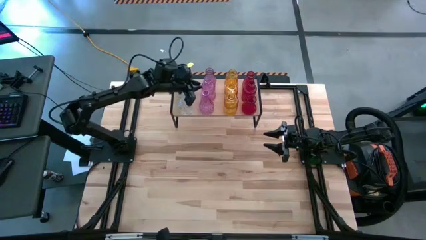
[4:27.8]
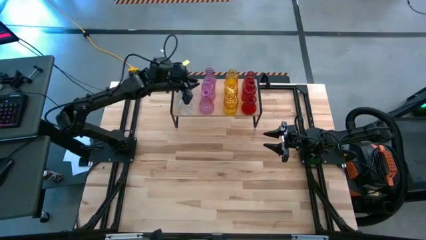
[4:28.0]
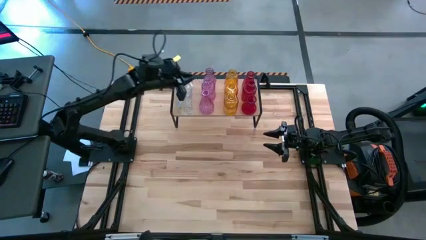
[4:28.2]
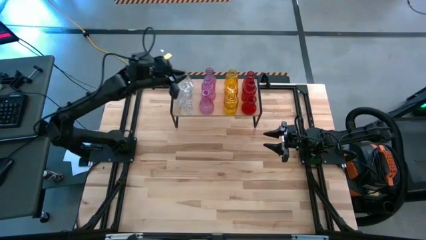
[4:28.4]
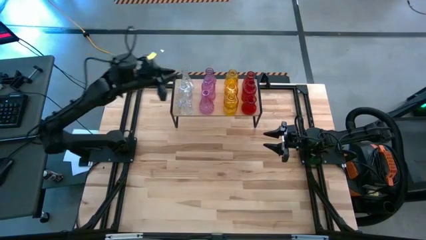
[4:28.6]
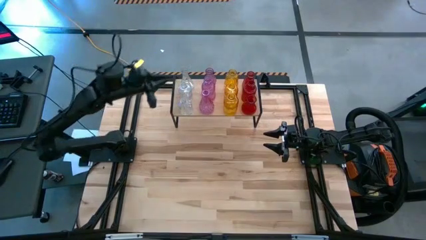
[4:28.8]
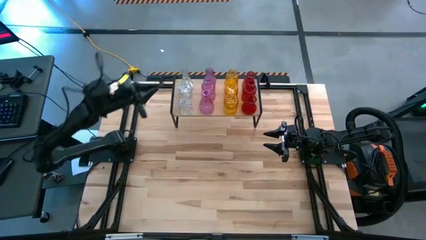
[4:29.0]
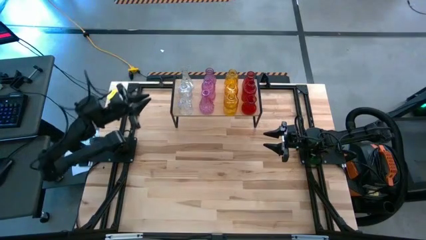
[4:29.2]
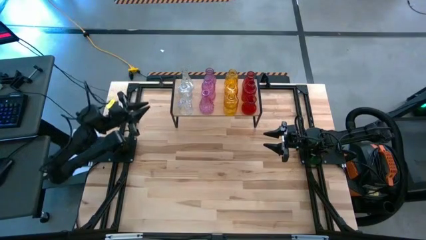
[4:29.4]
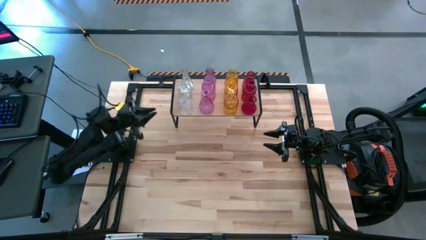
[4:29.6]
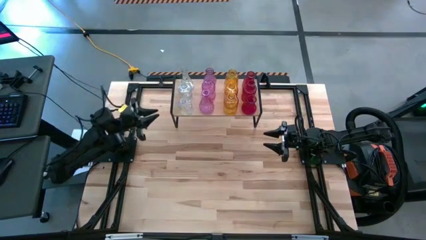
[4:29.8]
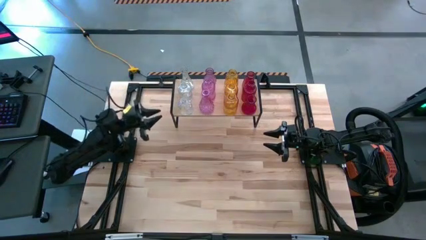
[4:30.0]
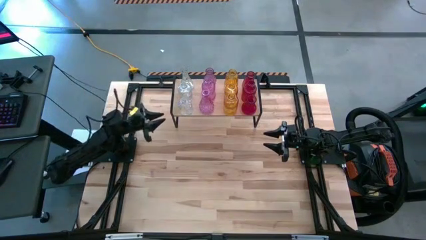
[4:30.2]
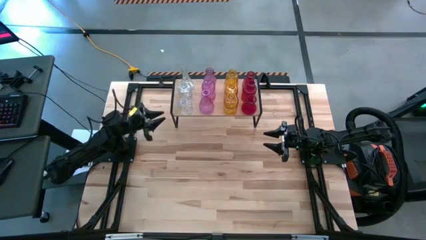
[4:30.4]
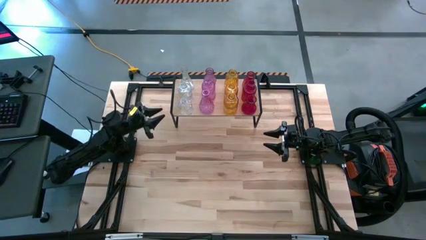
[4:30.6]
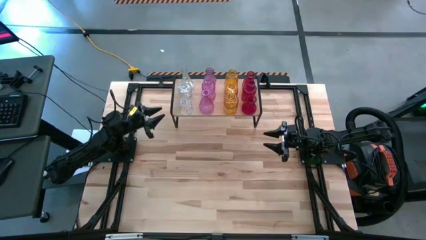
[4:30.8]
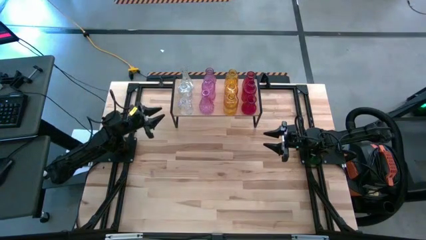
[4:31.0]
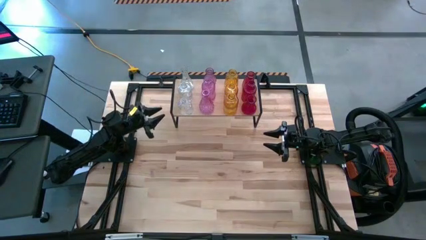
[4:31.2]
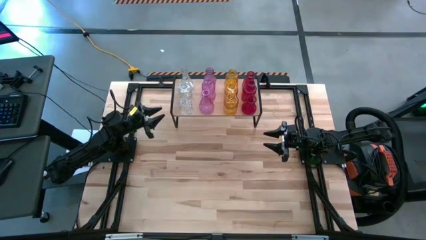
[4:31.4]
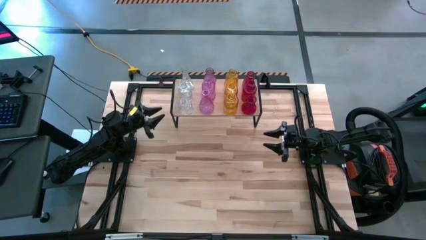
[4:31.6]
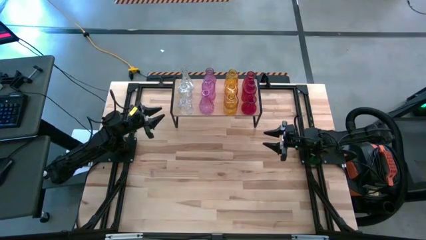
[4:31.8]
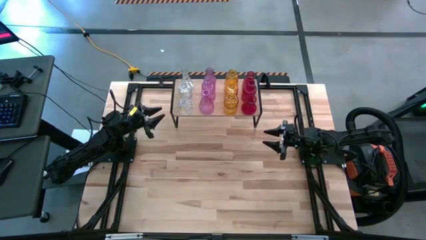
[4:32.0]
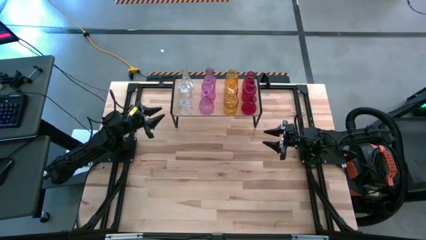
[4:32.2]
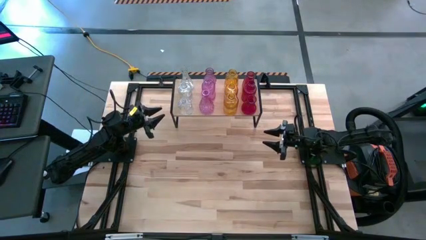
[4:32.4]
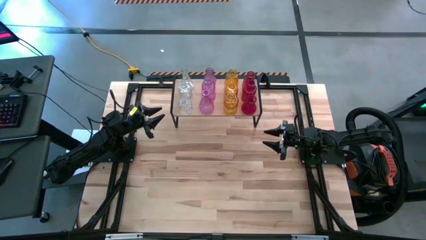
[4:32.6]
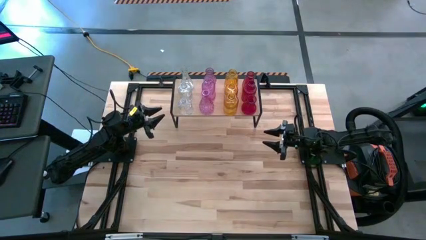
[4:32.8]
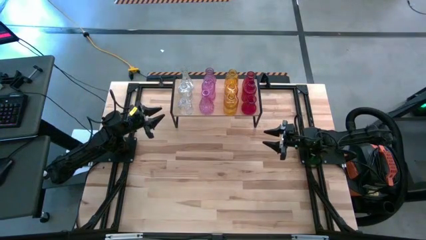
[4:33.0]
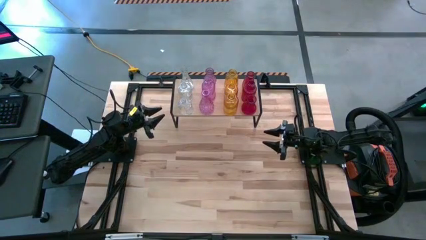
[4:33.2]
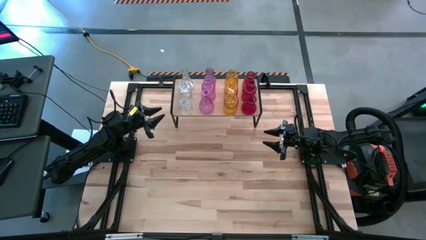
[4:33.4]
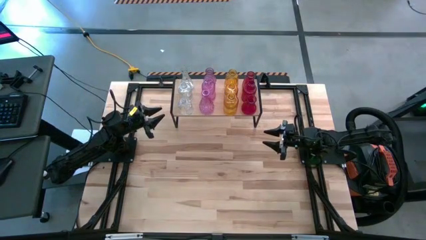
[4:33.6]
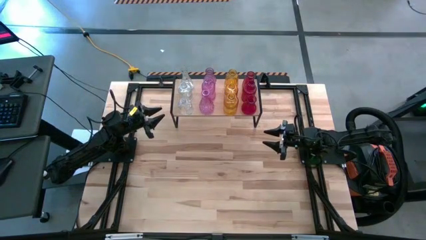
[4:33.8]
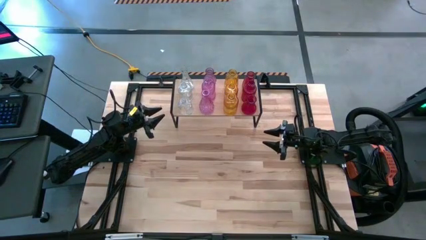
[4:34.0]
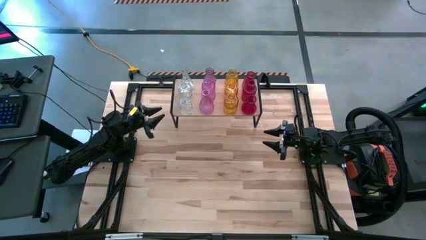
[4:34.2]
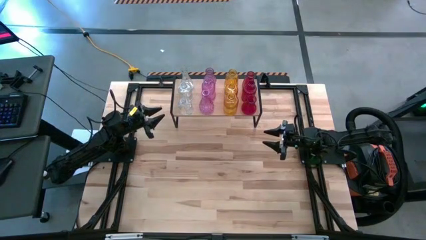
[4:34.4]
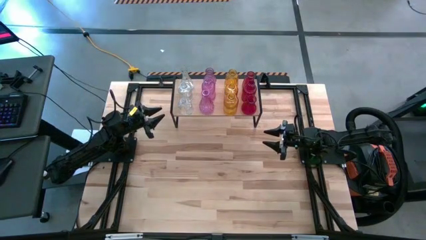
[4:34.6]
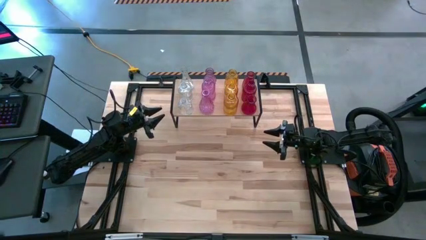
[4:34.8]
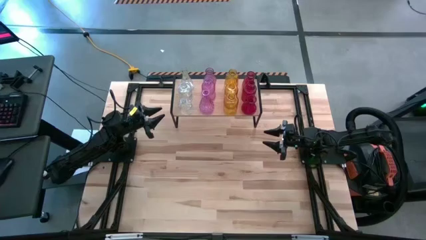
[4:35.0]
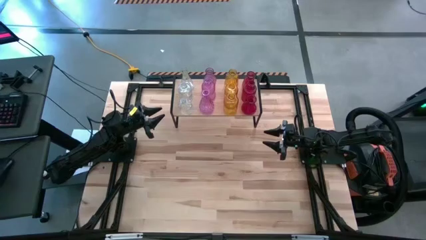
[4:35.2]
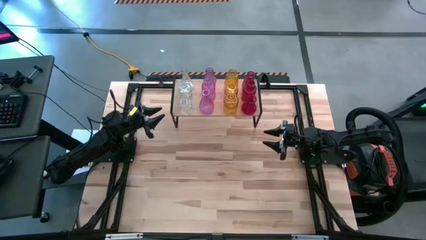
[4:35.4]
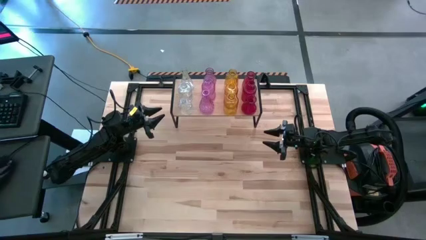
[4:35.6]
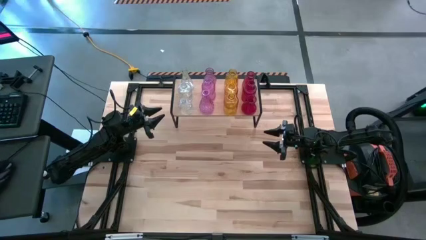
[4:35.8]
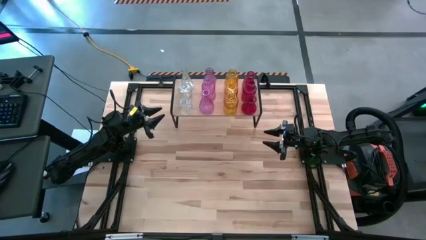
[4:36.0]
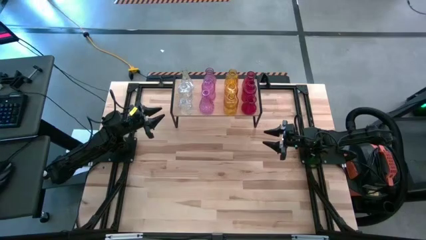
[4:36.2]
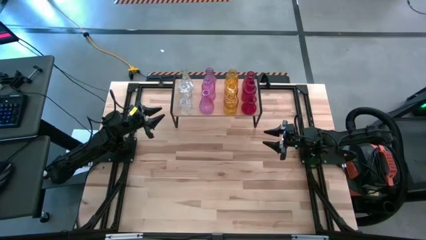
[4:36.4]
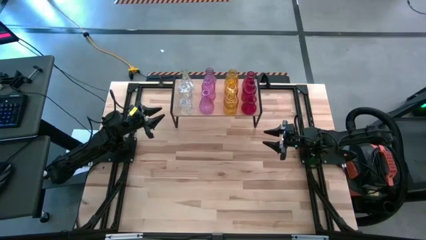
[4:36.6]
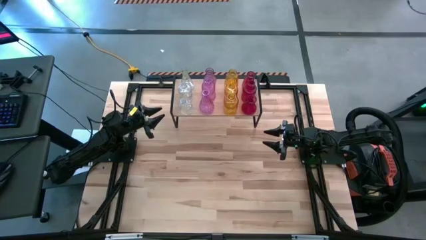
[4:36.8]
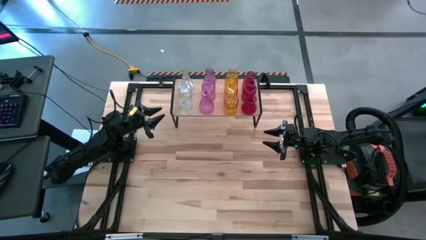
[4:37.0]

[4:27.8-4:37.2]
Task: sort vases onto shelf
Return to Home Position

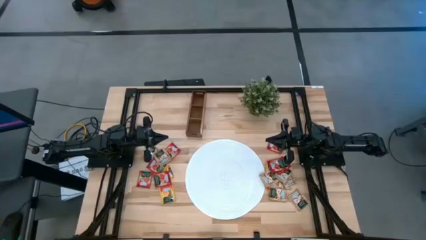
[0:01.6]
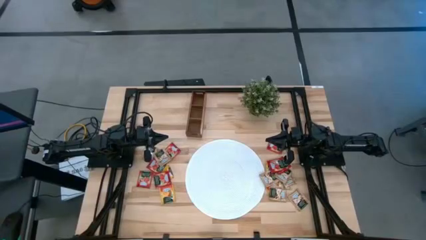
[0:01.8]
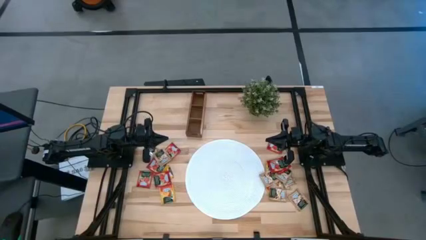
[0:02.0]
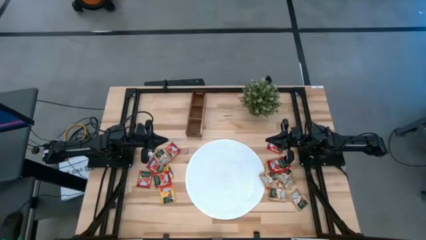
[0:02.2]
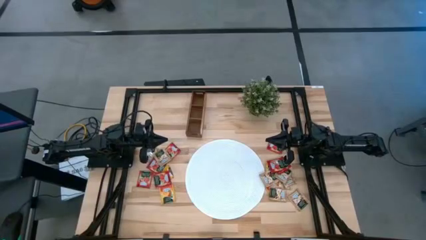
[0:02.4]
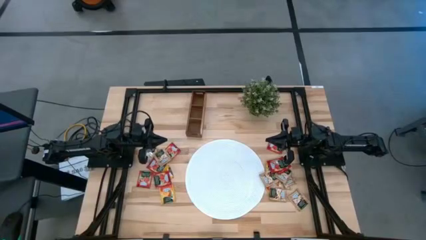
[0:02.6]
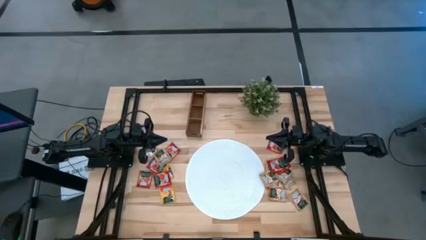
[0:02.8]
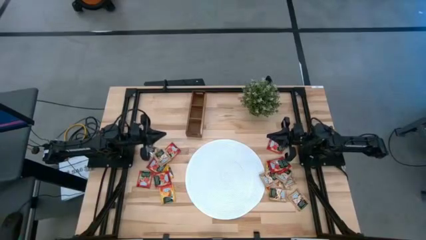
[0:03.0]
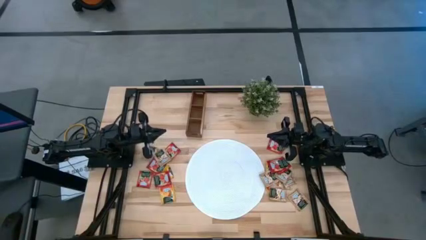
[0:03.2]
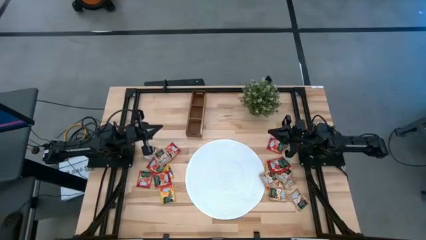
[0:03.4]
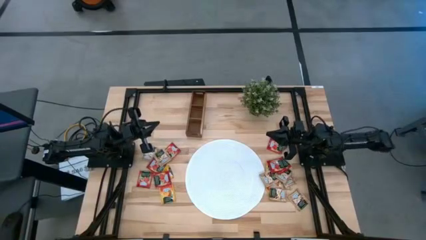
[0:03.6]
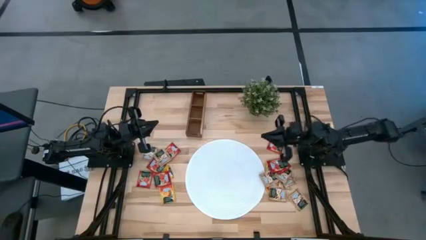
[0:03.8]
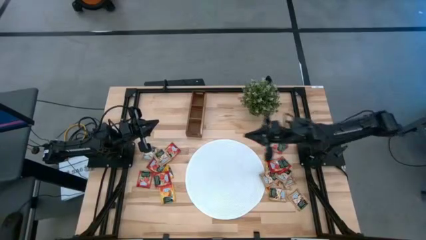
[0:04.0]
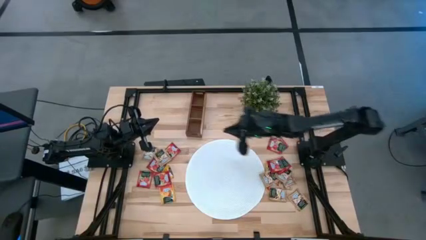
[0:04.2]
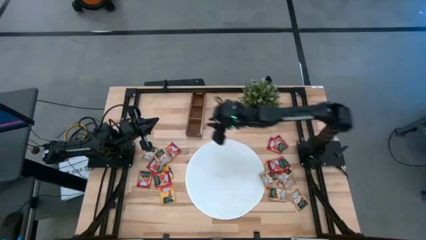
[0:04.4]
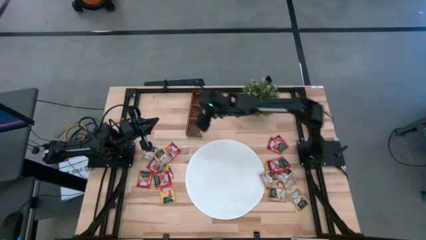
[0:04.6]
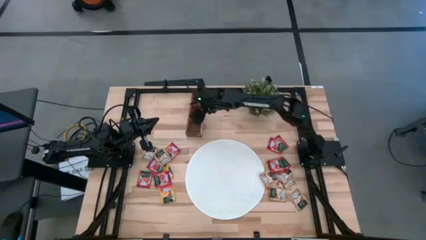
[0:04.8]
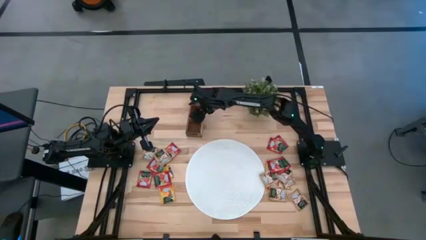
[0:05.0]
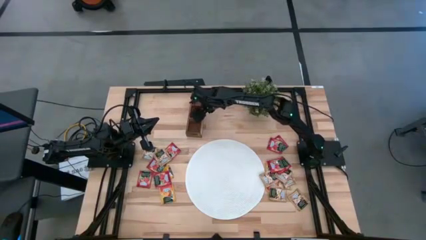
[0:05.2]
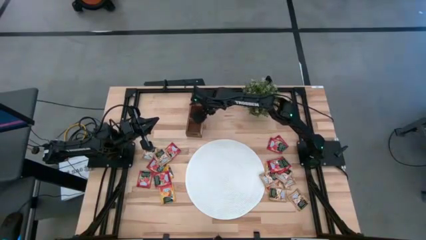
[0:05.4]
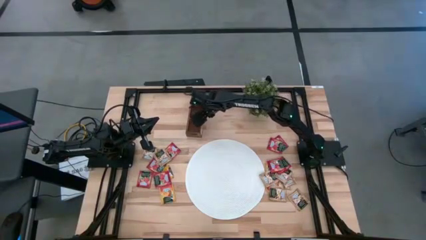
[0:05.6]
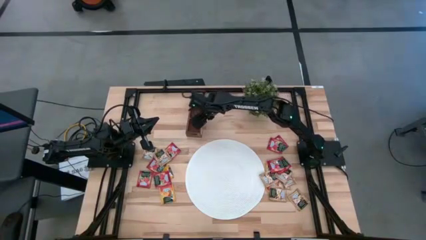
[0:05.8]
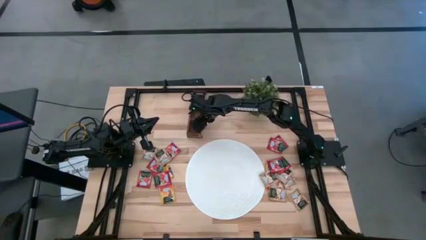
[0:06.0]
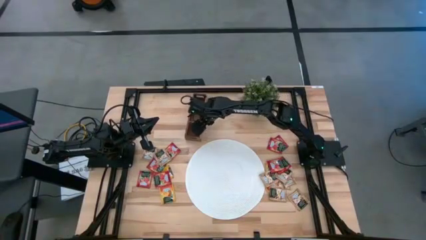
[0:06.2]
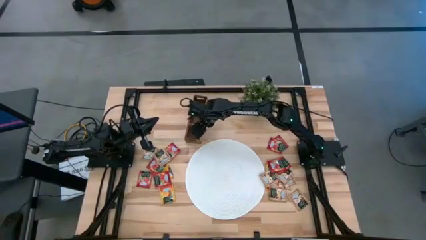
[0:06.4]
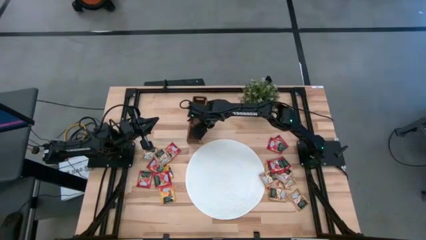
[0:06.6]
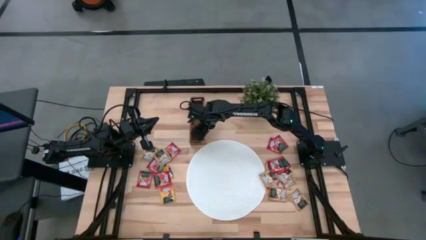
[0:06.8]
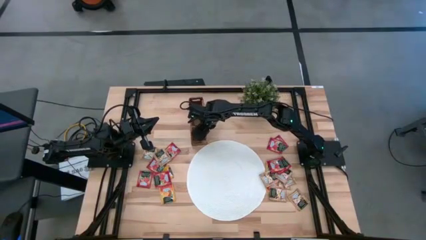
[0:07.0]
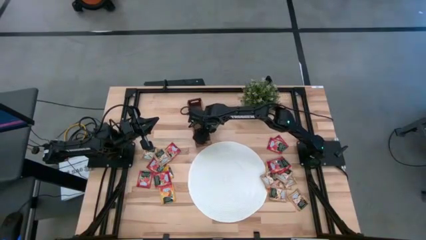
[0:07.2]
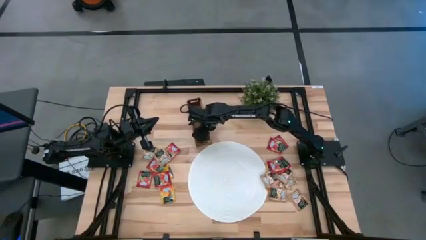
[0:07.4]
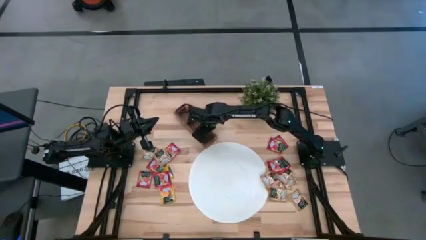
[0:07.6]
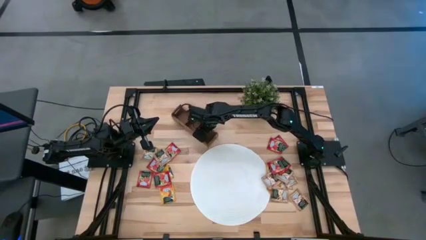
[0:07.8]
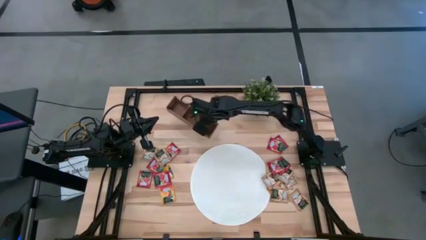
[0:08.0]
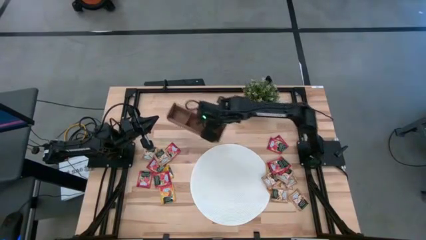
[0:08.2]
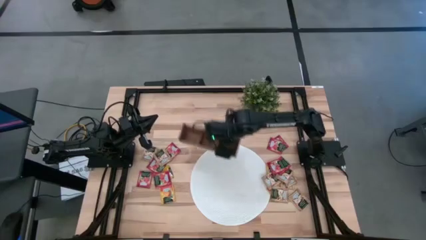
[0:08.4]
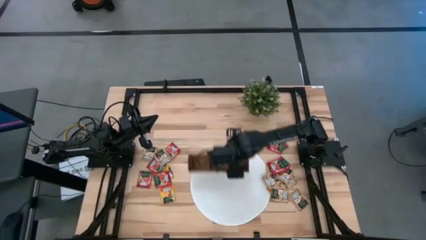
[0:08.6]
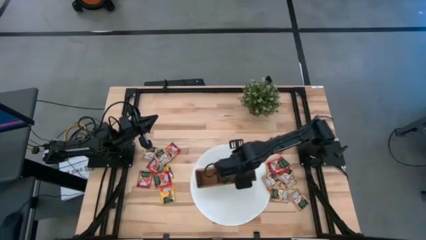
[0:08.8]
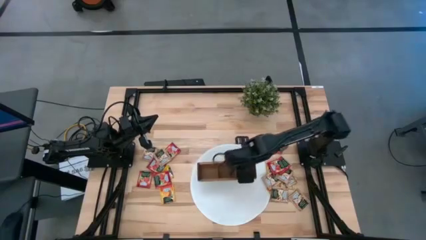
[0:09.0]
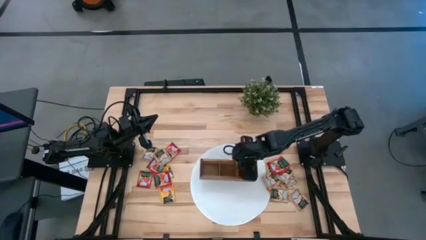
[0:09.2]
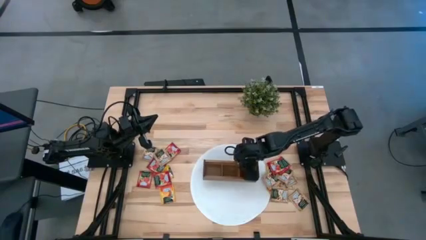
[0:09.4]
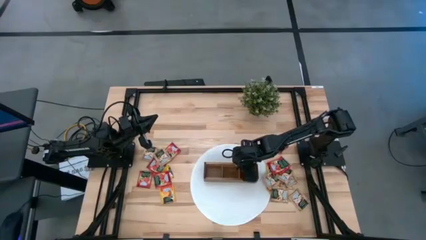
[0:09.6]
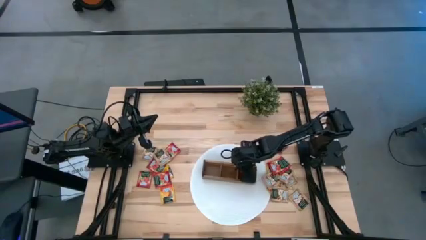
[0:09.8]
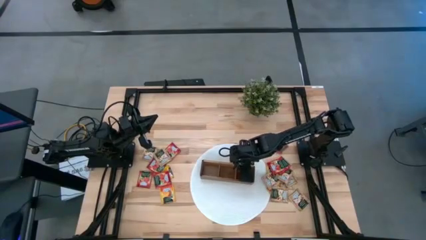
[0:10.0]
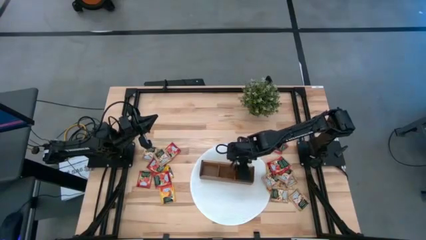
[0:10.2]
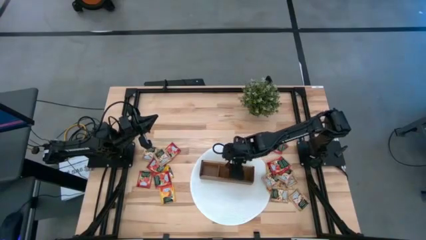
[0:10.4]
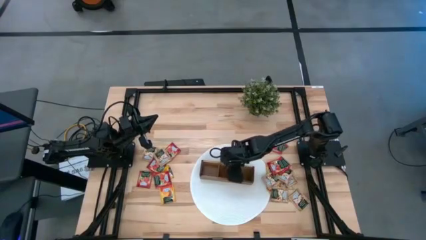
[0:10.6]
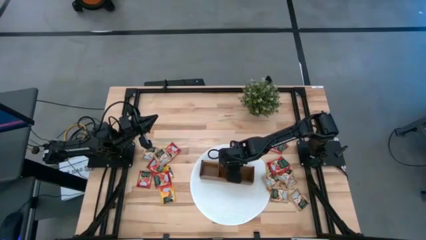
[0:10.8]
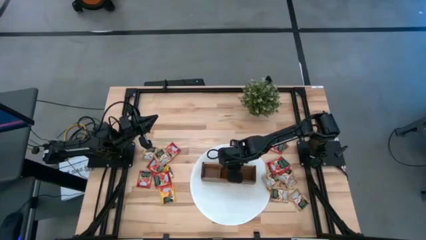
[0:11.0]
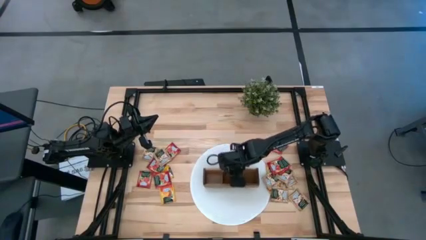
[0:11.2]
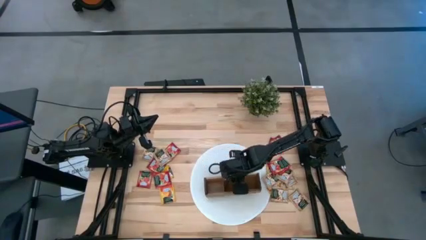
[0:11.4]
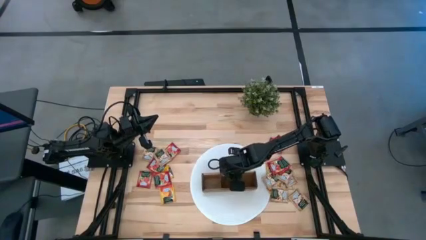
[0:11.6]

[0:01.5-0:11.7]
Task: Pick & Place Tea
Put the wooden organizer on the white mat
